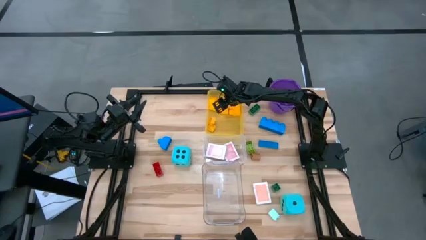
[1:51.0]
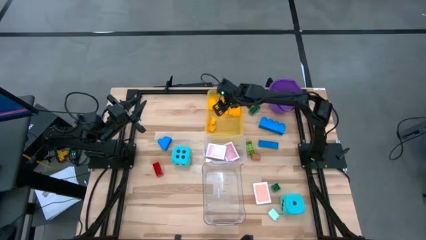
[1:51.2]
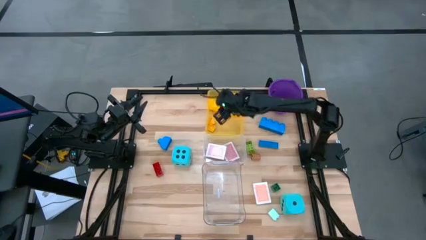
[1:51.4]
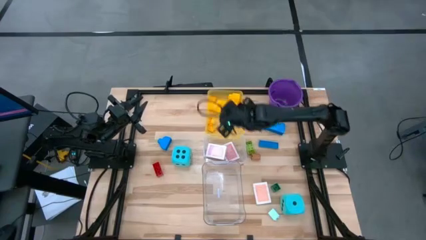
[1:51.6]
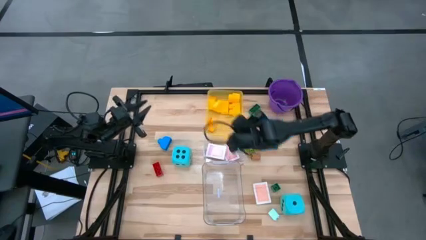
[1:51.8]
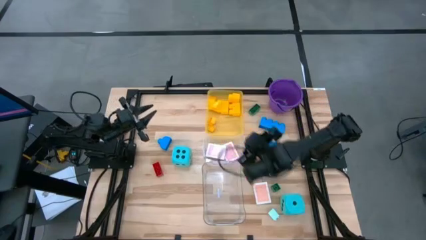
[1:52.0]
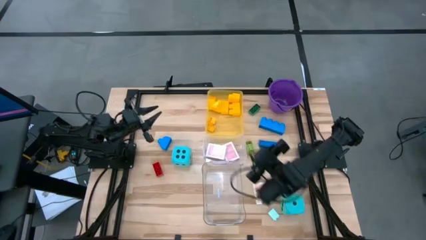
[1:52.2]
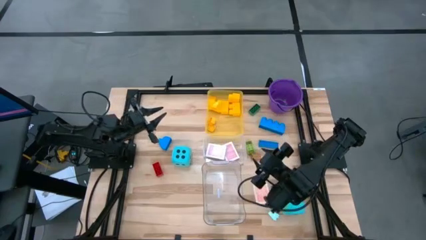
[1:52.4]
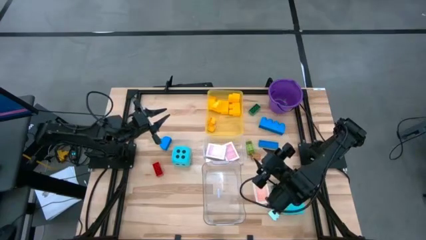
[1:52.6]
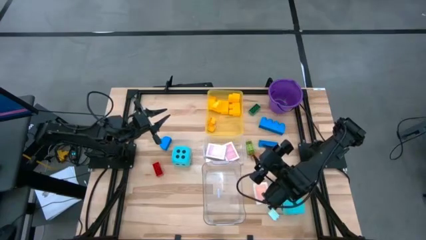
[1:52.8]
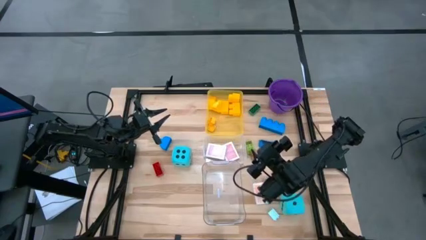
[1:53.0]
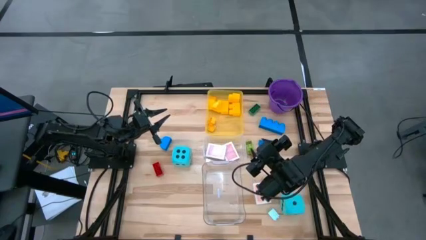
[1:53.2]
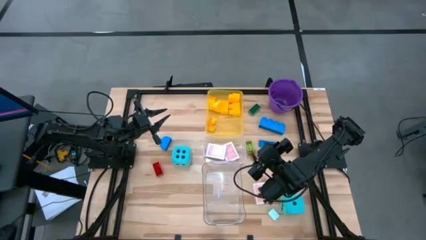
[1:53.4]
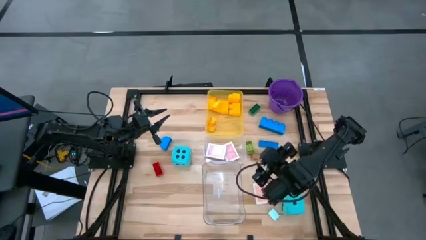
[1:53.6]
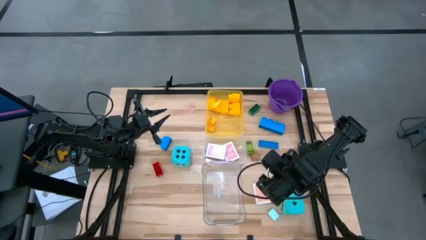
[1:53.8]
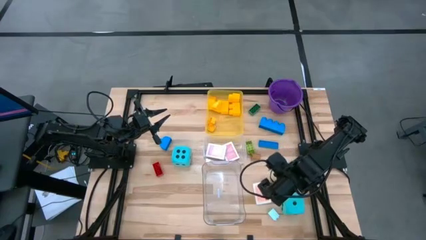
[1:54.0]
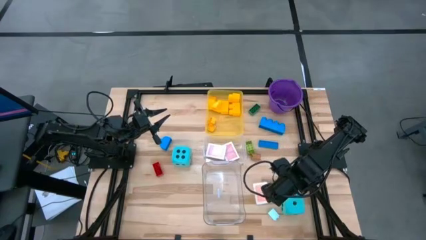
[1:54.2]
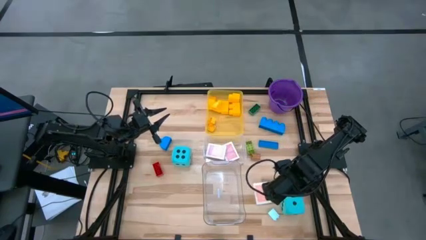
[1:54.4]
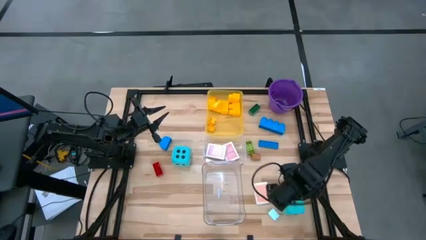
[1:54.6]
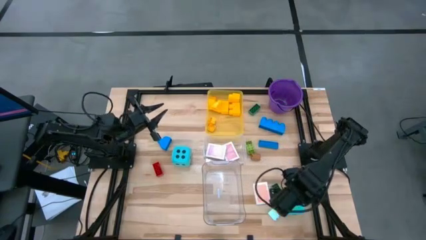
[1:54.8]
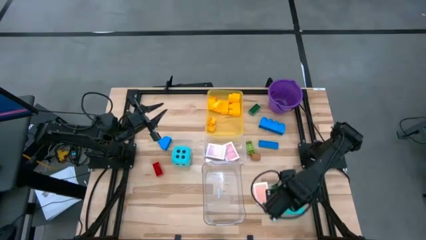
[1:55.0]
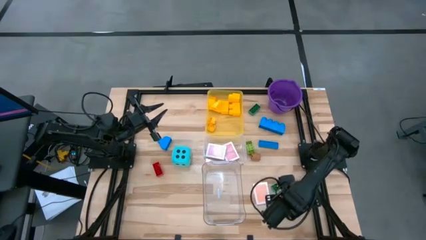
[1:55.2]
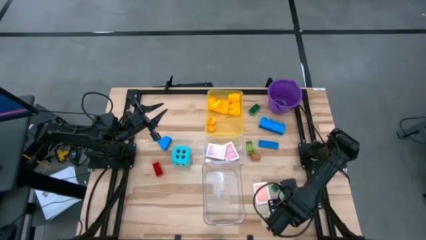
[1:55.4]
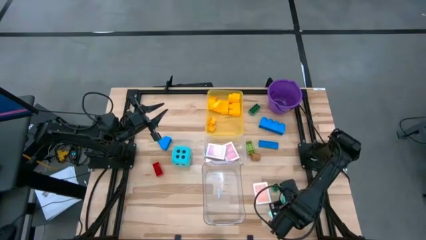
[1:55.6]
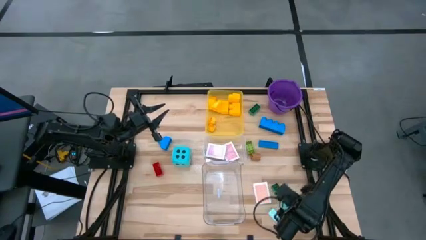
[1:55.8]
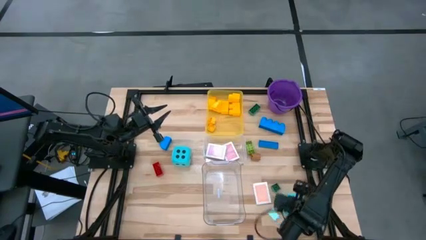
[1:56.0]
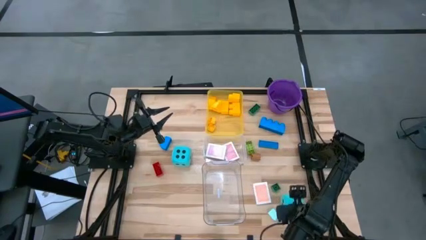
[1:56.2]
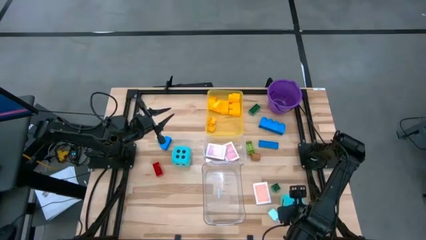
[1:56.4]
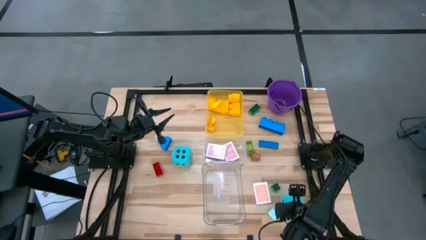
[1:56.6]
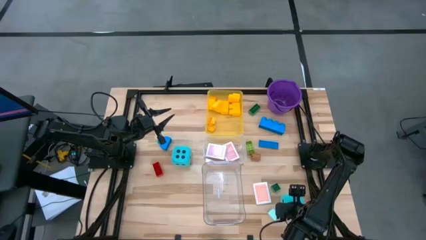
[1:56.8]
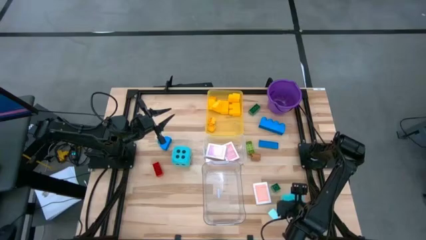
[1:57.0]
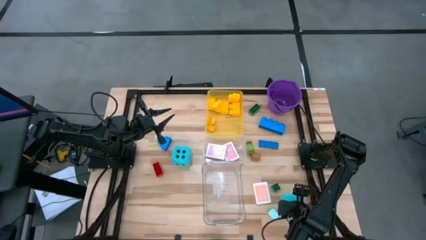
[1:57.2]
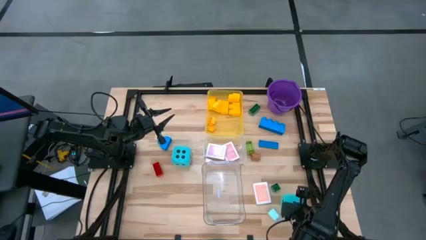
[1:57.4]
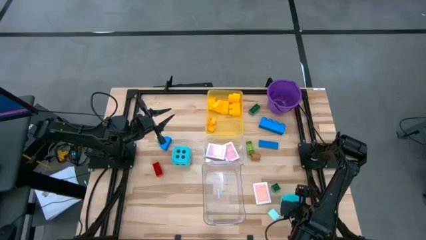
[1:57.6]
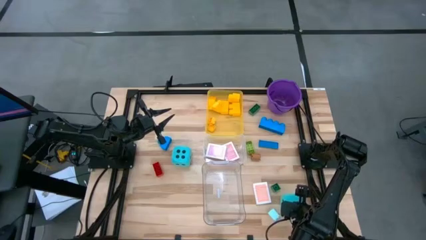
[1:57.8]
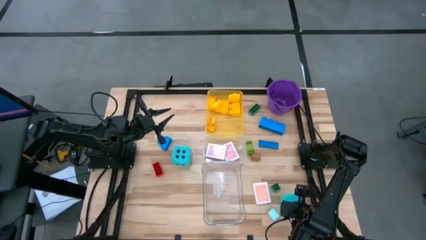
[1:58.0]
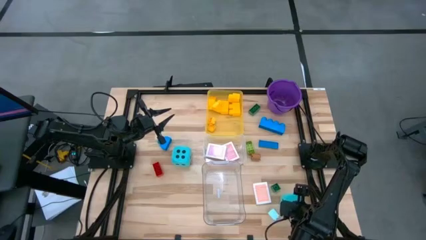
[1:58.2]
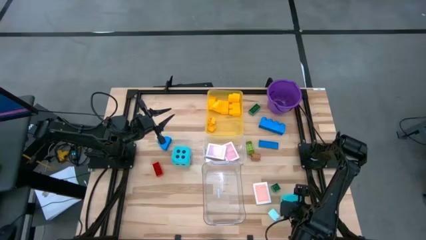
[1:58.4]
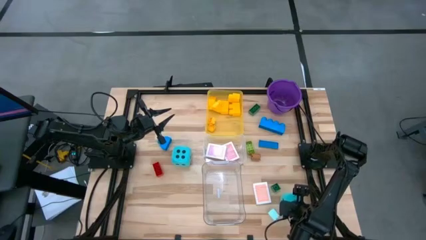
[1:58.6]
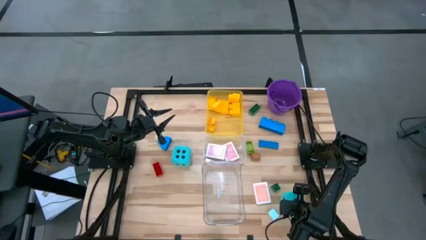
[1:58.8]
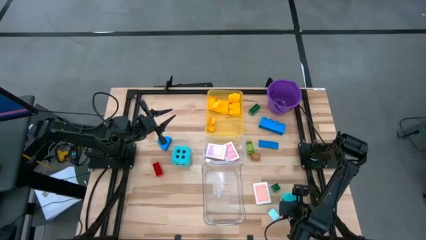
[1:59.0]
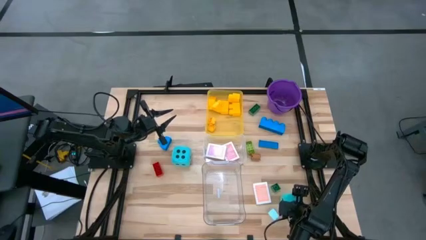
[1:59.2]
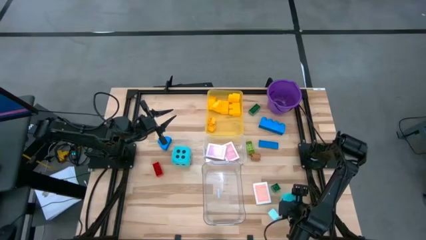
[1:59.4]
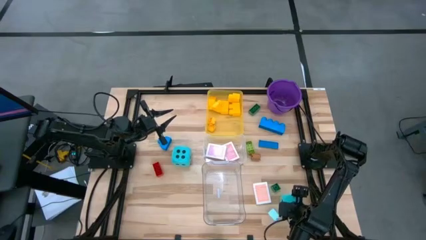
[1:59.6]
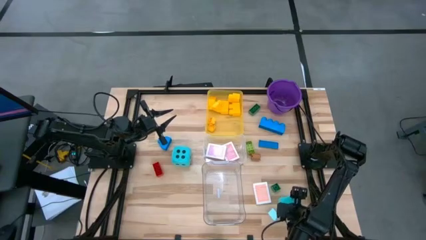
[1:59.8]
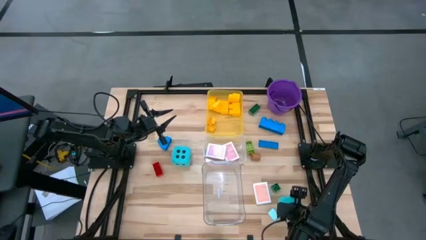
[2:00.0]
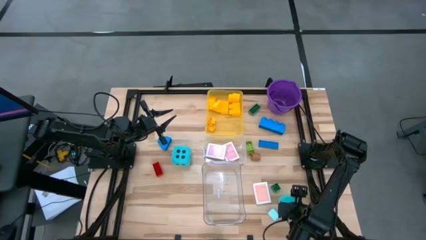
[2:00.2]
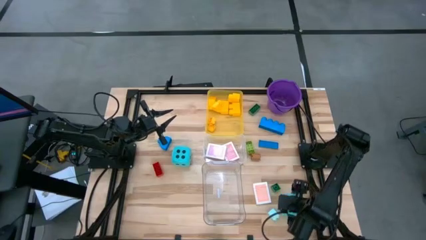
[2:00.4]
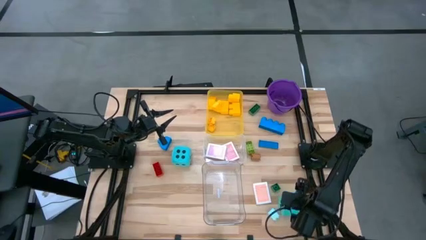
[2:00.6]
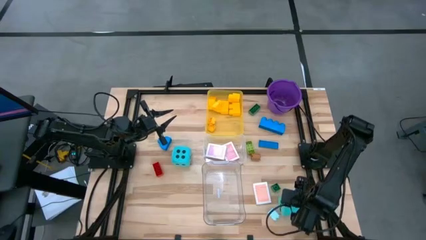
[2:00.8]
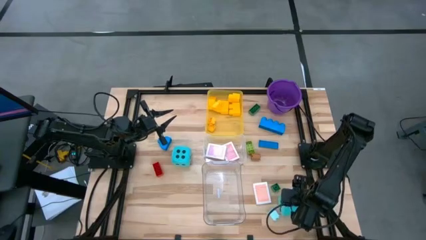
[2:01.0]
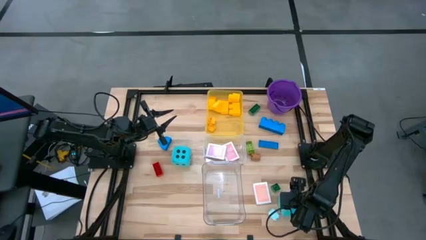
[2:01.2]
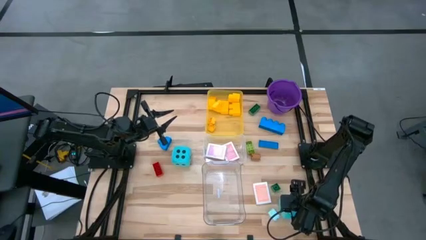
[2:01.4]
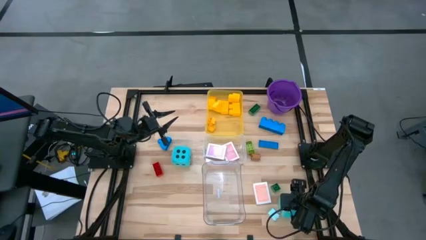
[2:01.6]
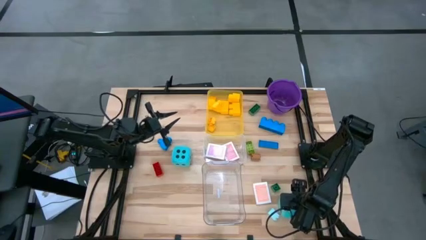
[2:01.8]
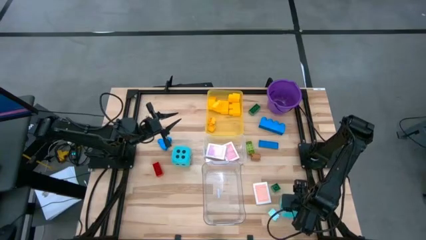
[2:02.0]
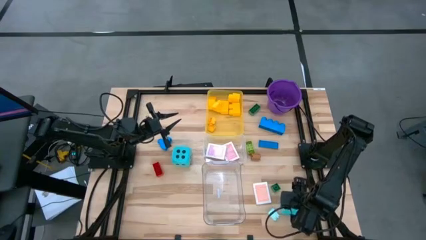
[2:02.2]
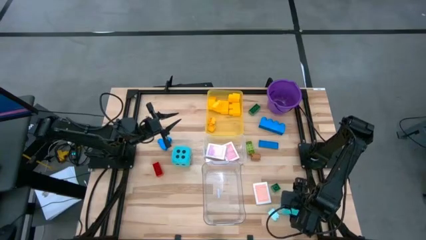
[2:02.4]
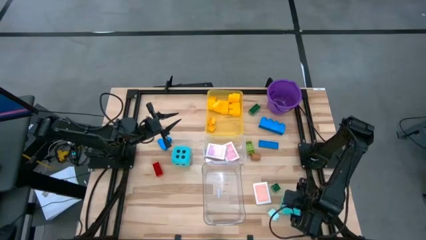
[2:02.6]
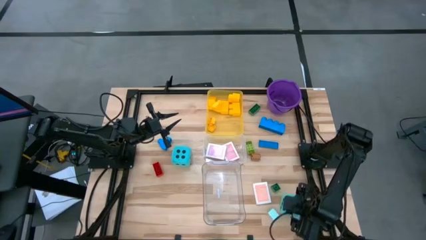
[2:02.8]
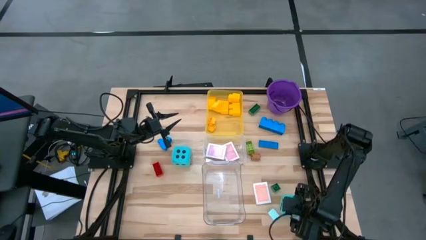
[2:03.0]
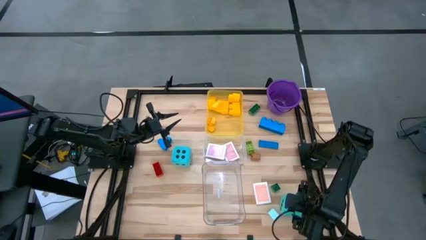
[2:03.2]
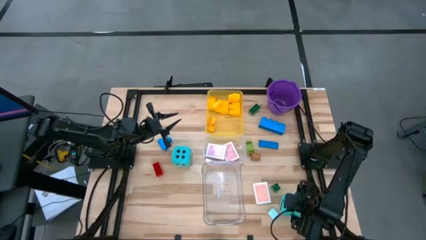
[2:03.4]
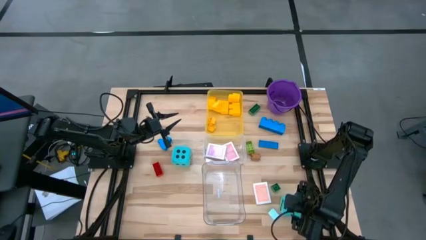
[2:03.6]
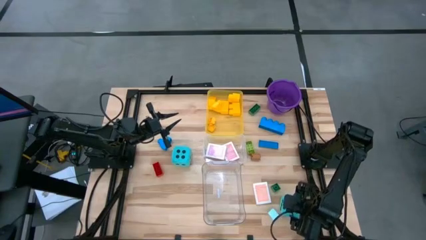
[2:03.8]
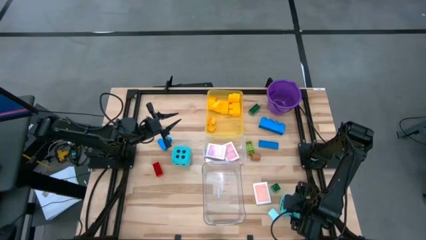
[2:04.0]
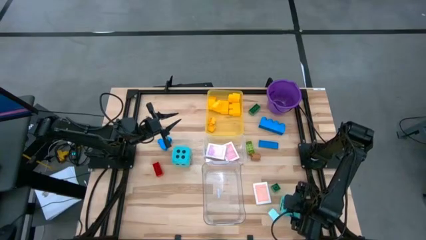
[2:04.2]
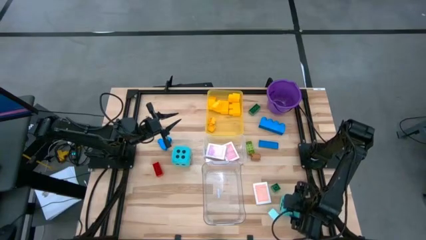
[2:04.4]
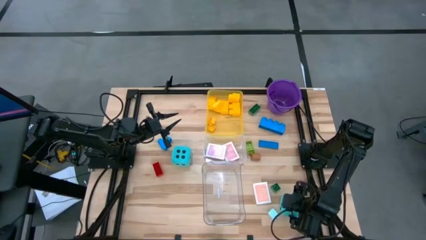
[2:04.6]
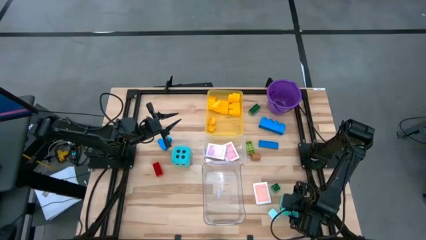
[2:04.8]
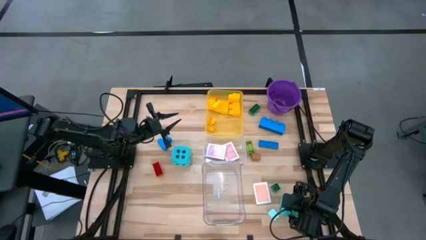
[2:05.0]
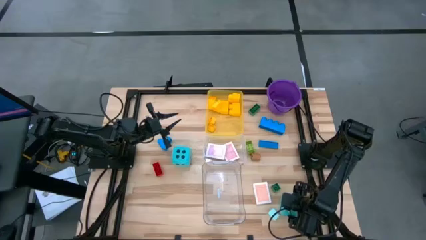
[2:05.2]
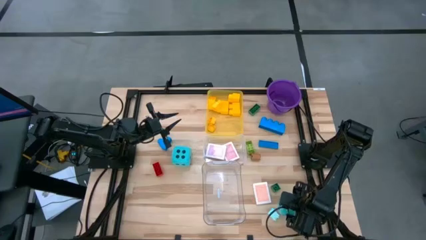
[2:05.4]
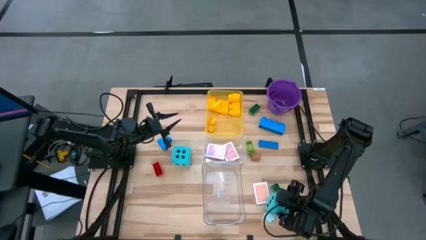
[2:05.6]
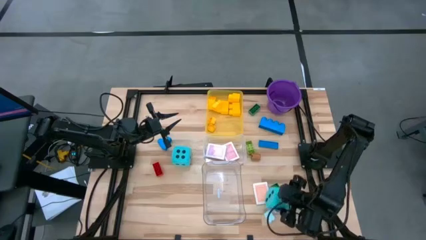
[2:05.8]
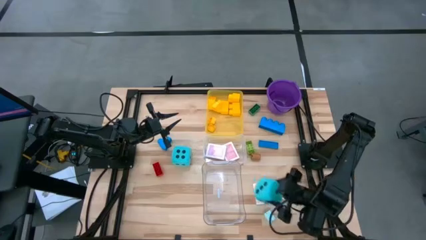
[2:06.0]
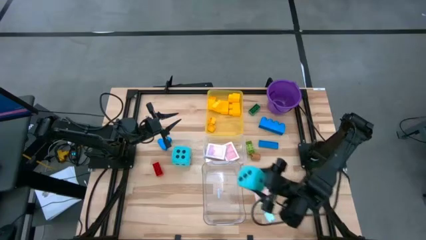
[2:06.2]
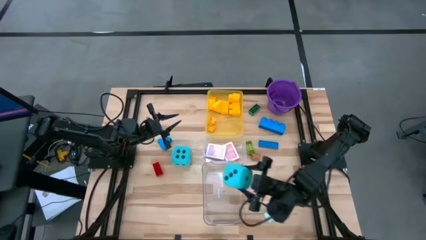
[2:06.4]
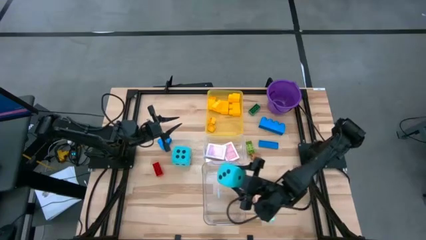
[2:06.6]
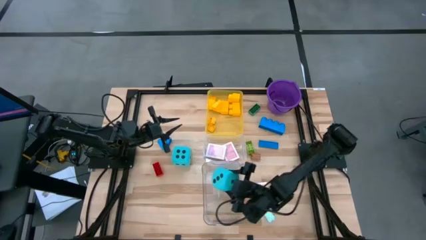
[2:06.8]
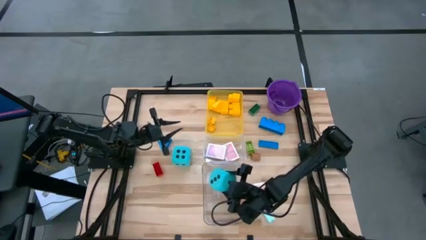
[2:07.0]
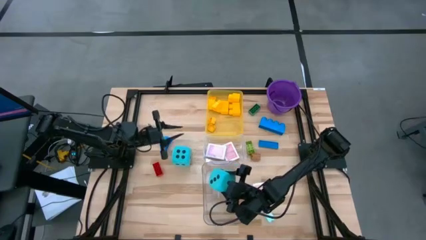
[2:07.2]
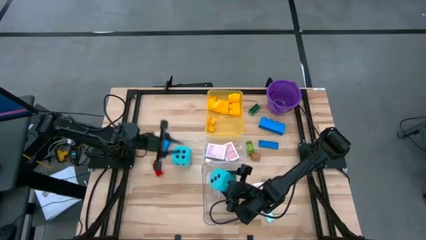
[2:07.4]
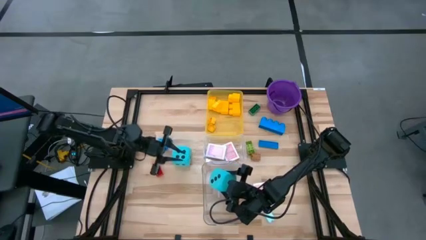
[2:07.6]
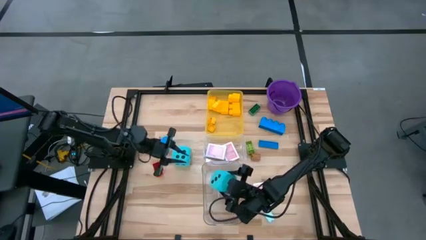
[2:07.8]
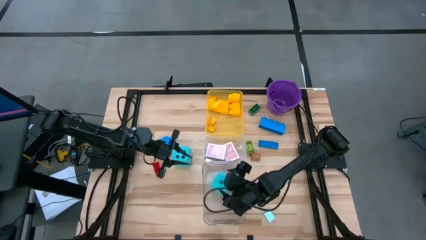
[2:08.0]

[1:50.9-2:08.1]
Task: Pick & Place Toys
Put the blue dice into the bottom transparent bin
